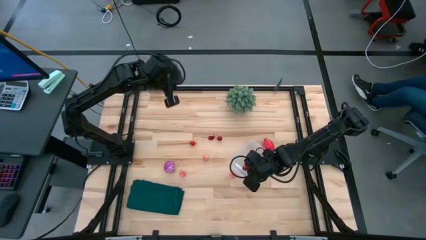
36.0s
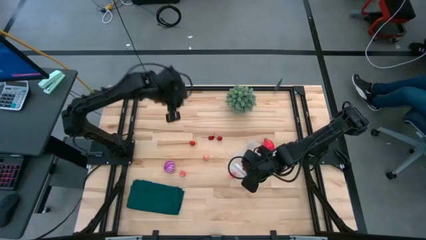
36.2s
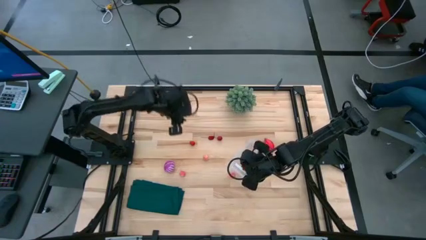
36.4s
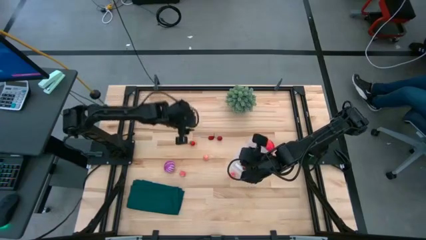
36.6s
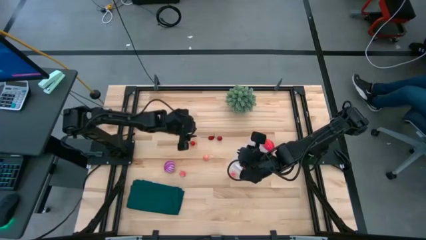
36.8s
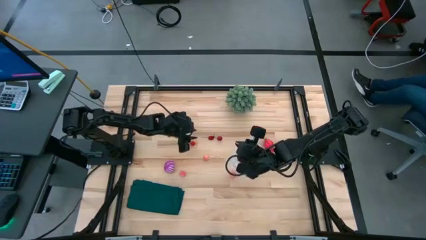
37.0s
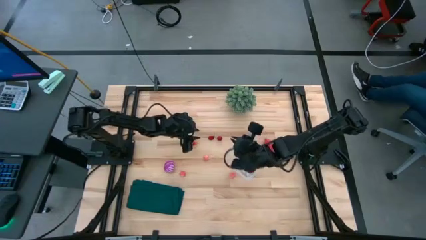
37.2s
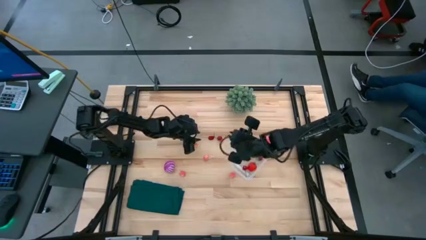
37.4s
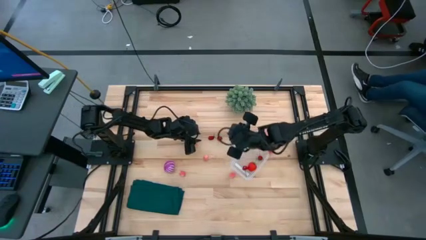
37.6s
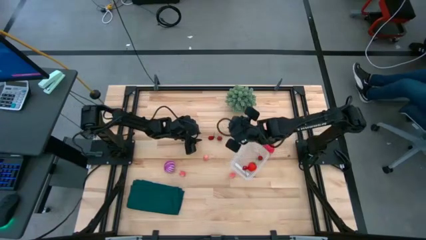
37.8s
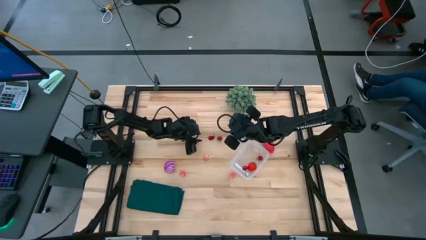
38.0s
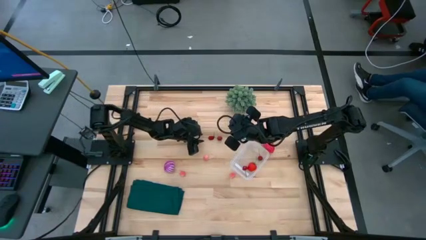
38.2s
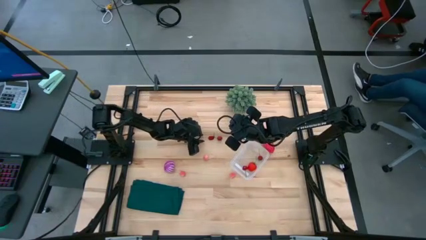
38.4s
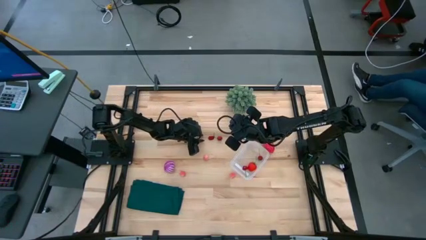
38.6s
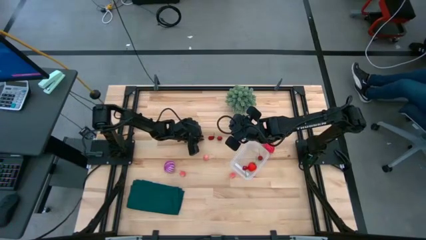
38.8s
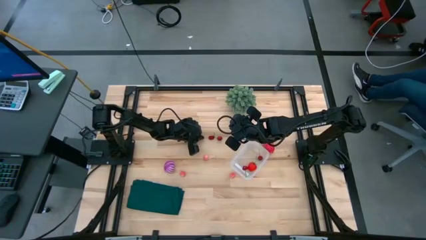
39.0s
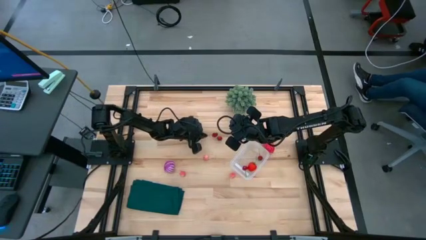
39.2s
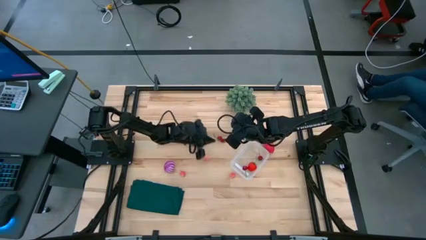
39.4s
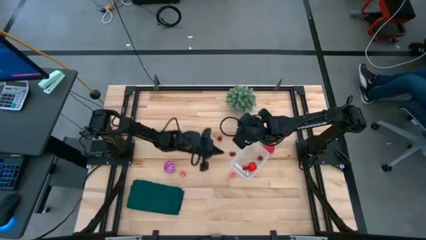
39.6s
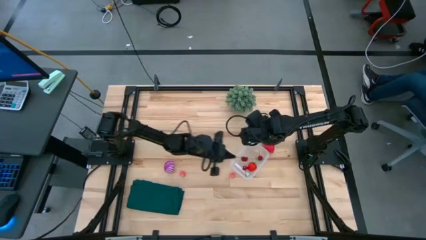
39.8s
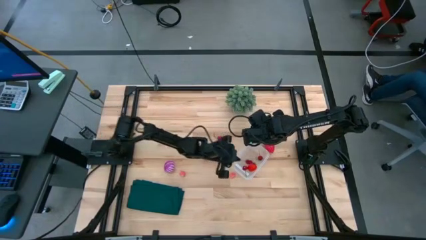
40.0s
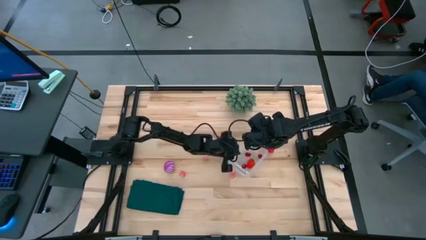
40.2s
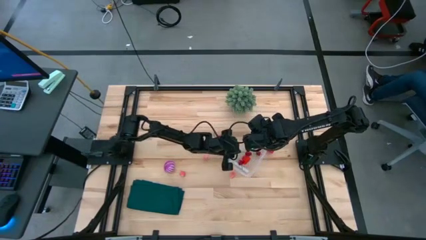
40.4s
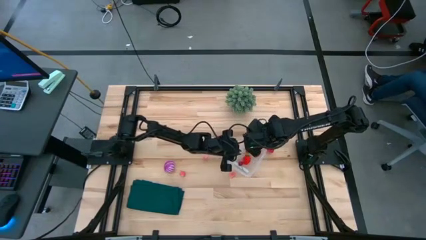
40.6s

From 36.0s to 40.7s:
Task: Pick and placing Produce into tupperware
Put the red cherry into the transparent bin

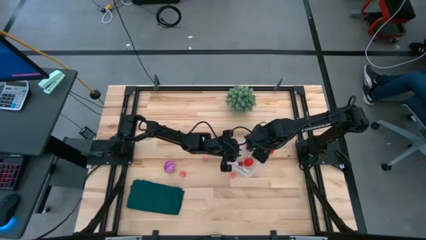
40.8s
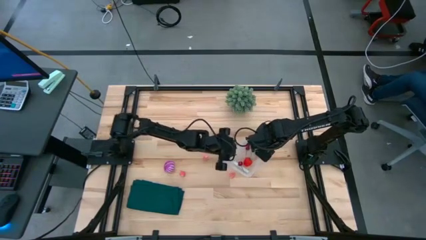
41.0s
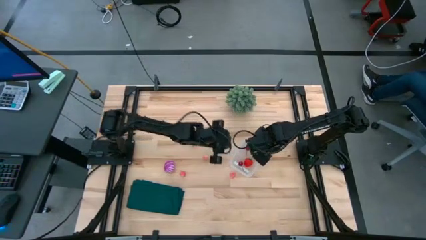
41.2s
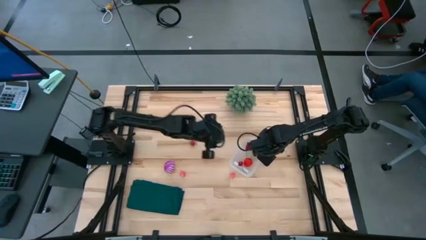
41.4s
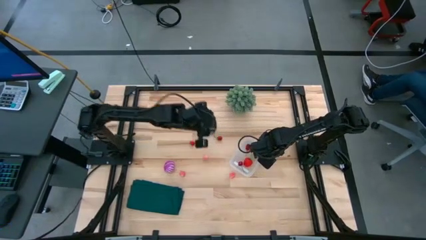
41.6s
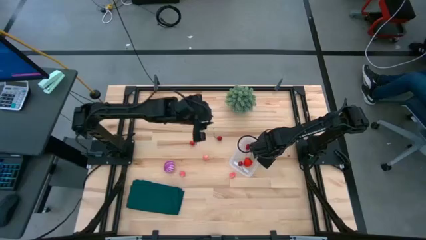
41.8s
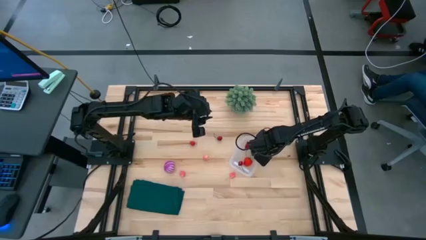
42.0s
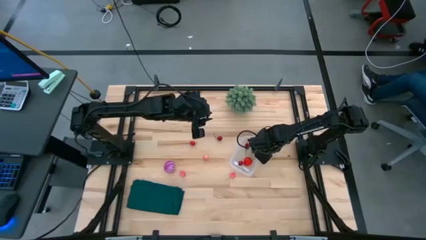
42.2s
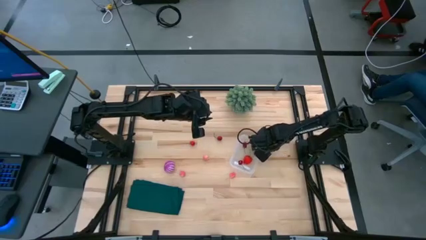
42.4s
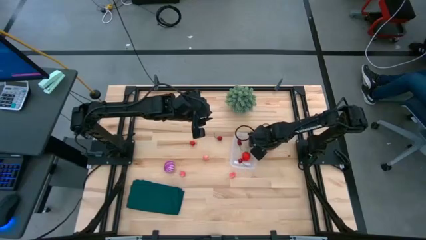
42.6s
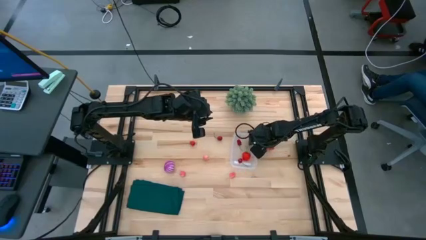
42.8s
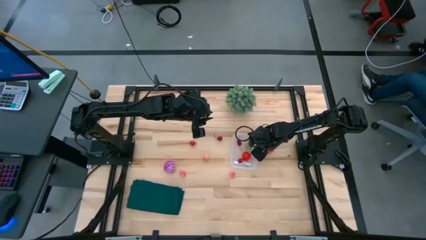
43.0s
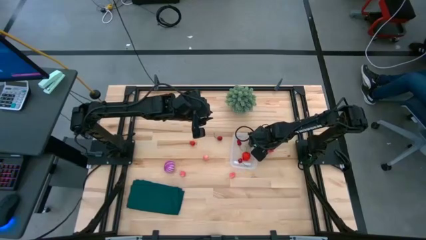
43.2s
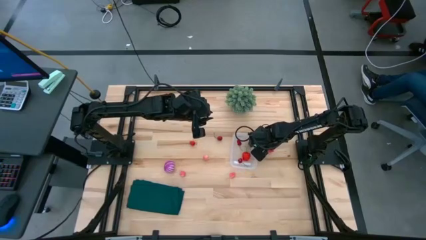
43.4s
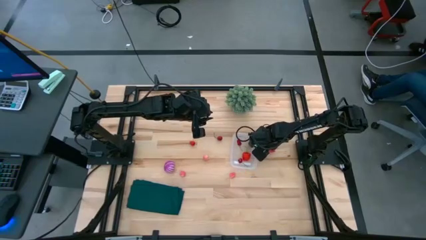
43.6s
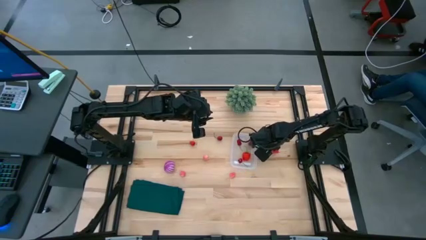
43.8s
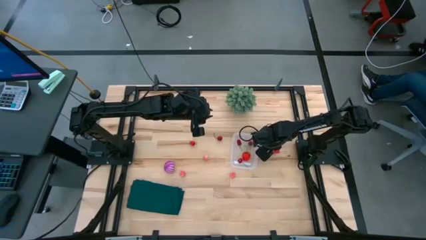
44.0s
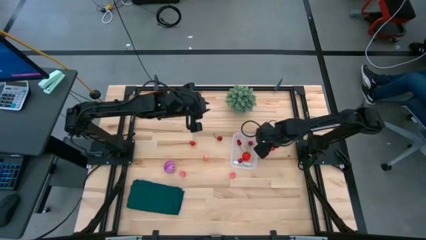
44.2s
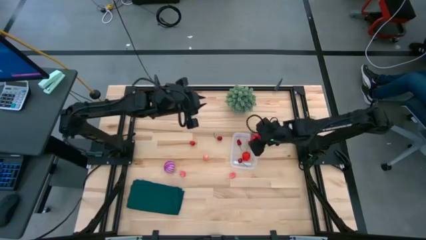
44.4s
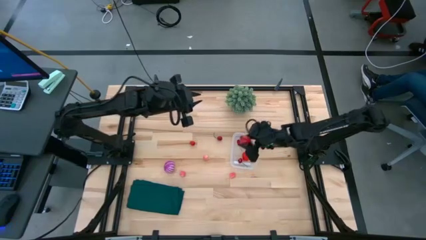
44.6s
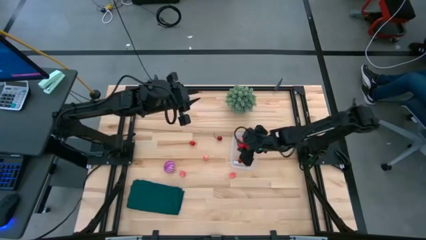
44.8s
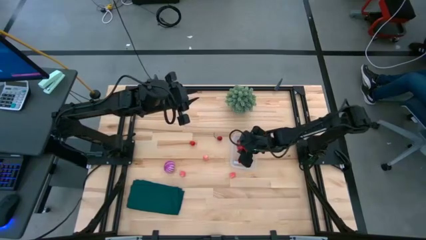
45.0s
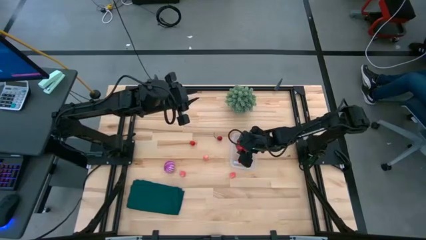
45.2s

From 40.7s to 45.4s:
Put the pink dragon fruit into the transparent bin

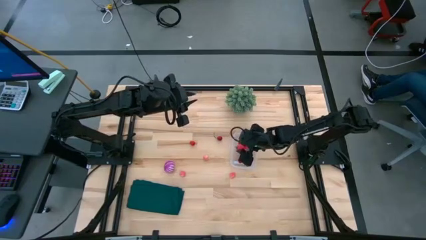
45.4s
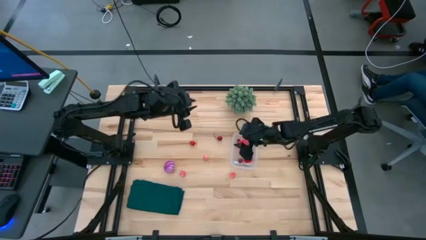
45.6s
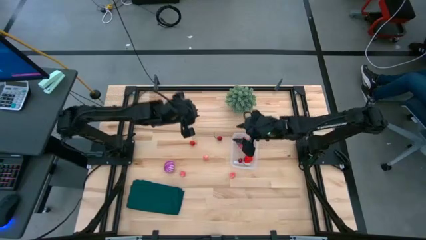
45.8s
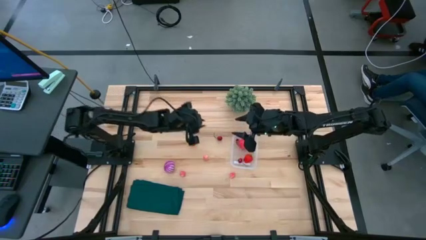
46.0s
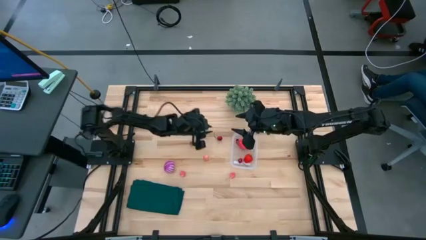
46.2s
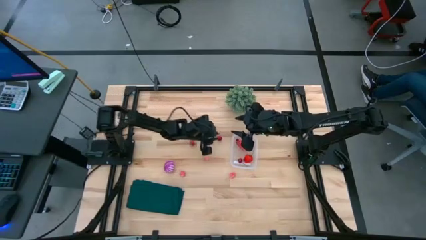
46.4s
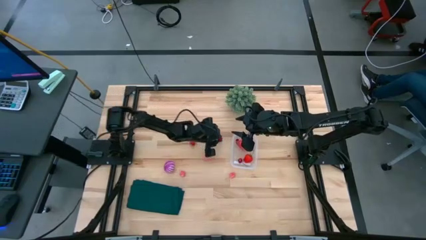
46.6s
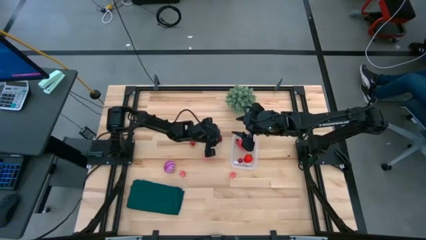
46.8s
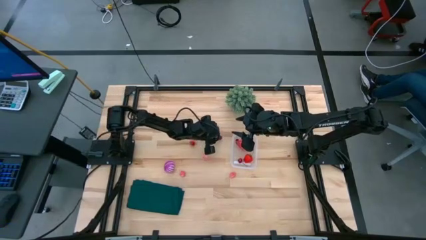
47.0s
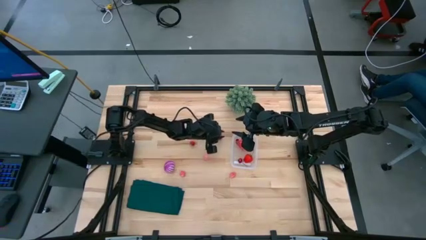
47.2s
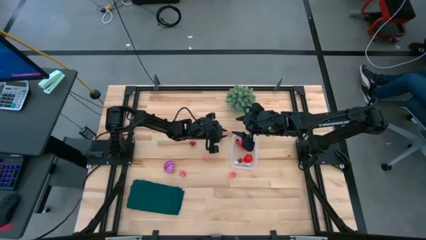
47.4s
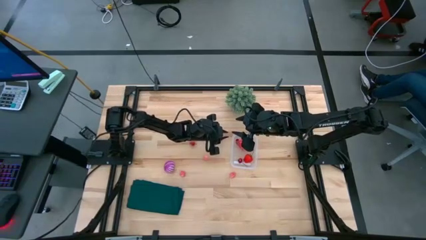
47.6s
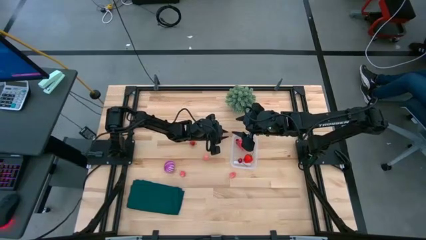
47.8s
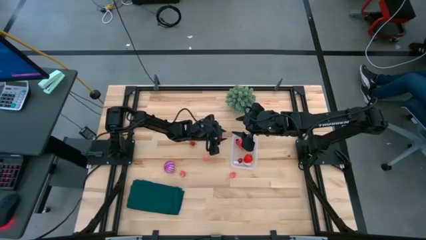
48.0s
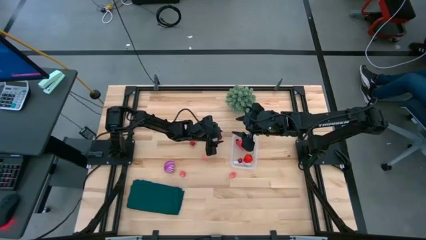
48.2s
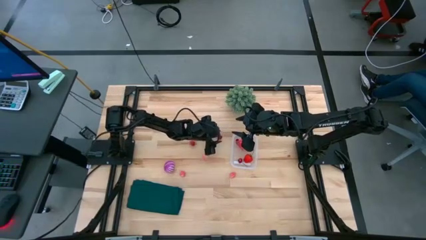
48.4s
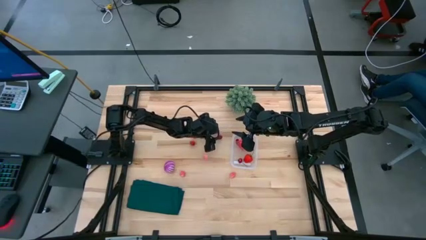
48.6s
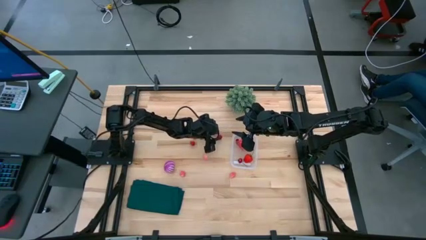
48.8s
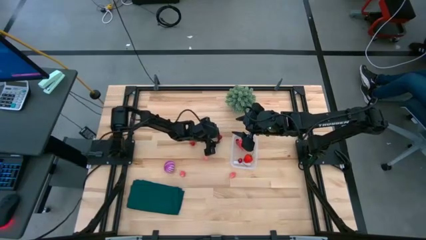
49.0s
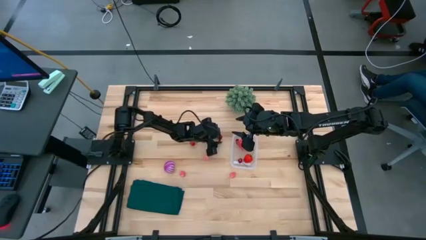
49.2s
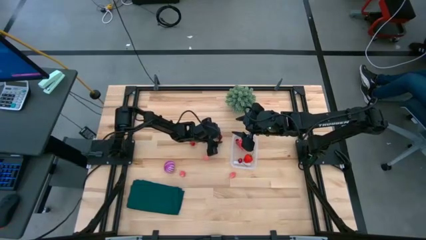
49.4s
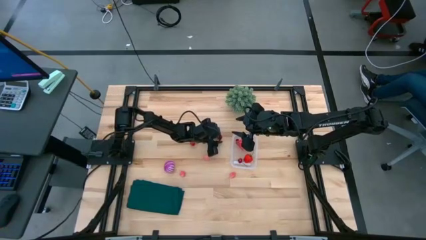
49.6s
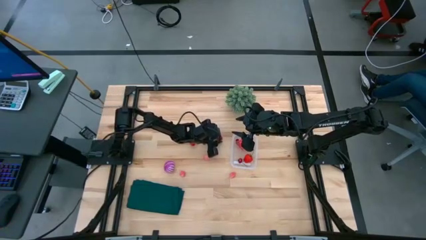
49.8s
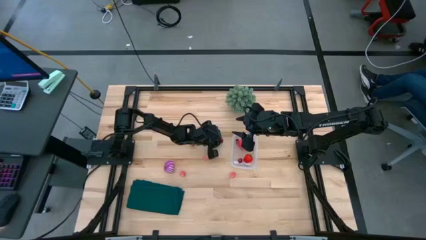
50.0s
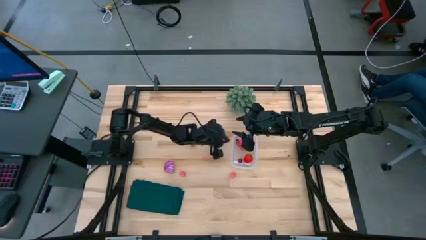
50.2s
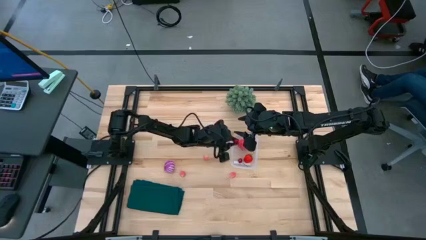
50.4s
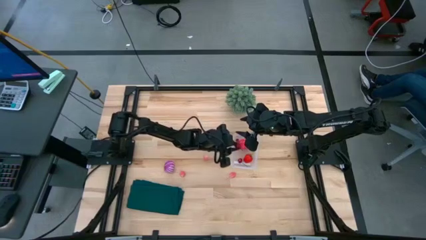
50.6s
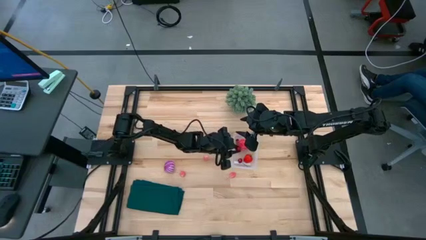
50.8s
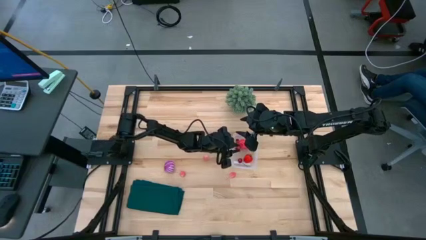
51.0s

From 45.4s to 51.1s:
Put the red cherry into the transparent bin

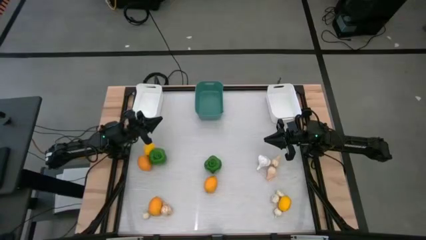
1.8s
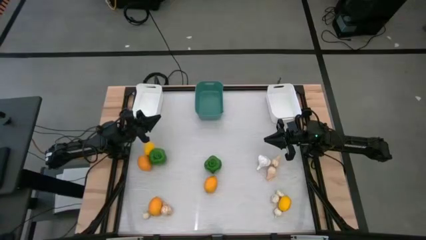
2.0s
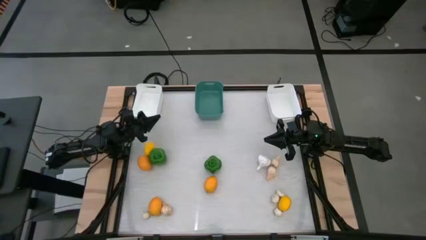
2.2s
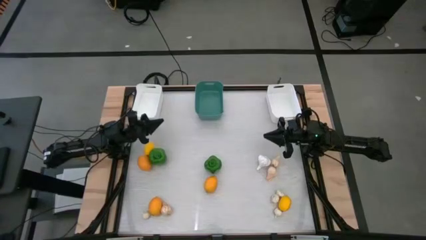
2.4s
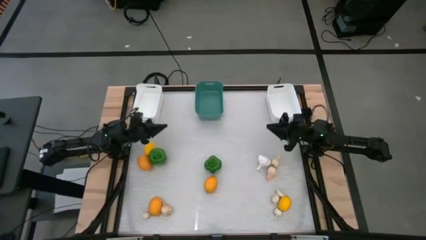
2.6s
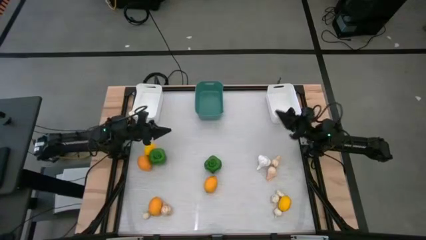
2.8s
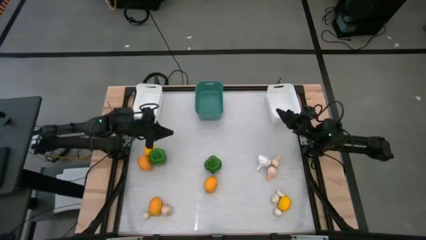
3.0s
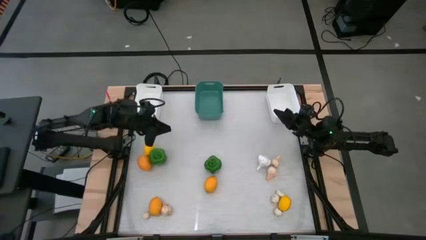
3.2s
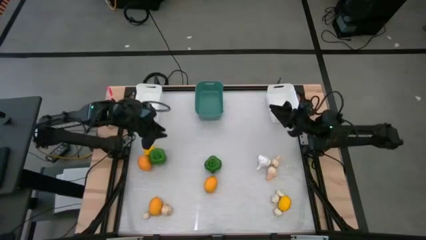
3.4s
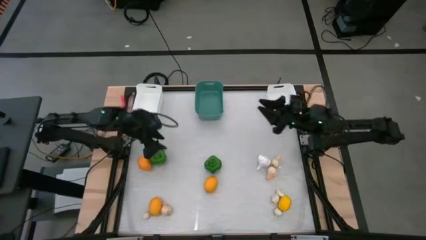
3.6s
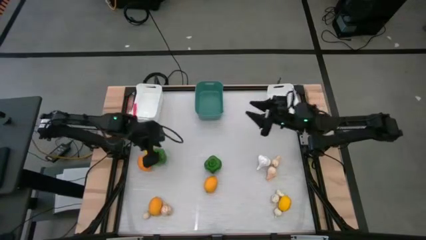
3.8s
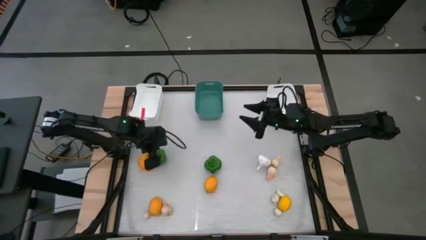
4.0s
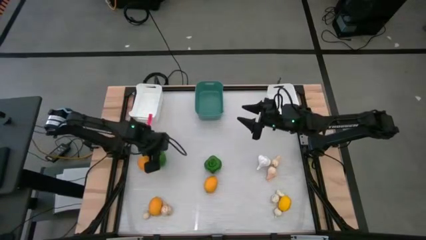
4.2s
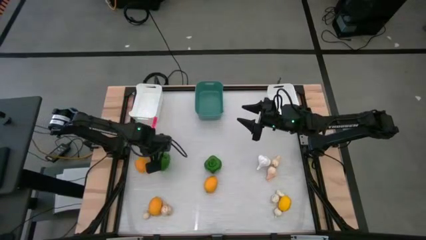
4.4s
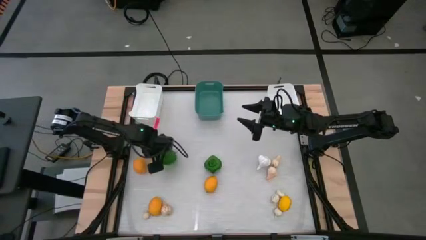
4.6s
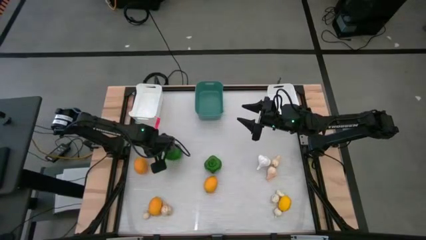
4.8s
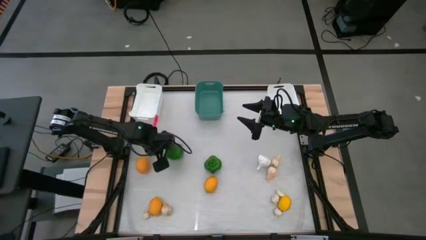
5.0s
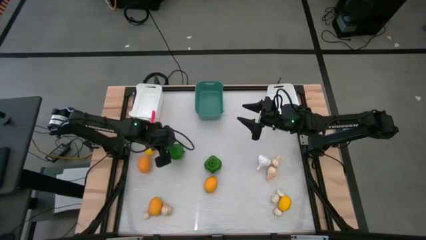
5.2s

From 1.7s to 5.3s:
Task: Sort produce into baskets
Put the left green bell pepper into the blue-green bin
